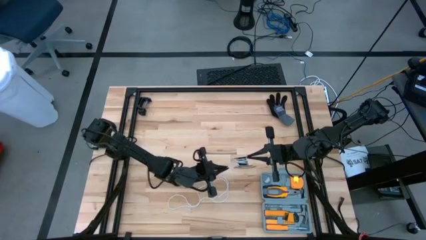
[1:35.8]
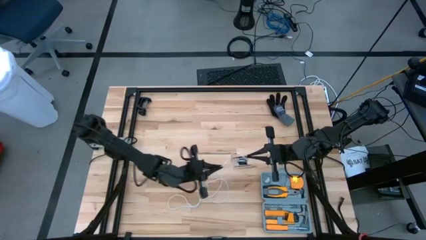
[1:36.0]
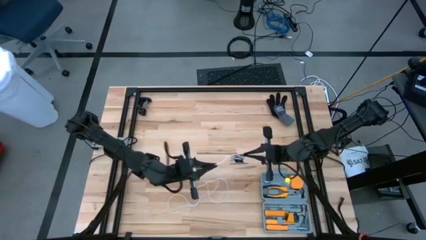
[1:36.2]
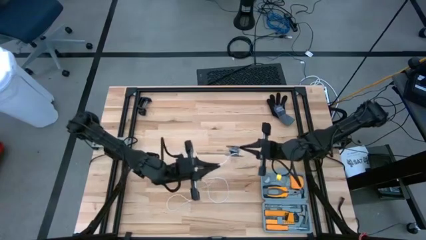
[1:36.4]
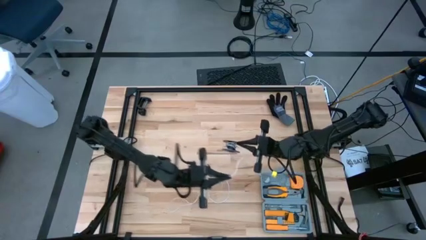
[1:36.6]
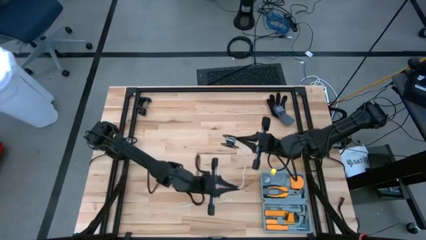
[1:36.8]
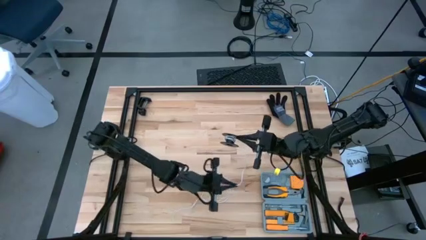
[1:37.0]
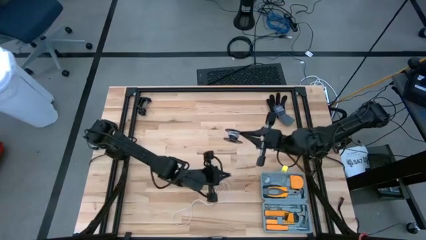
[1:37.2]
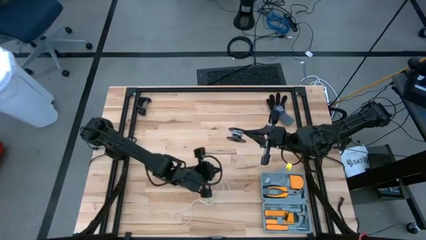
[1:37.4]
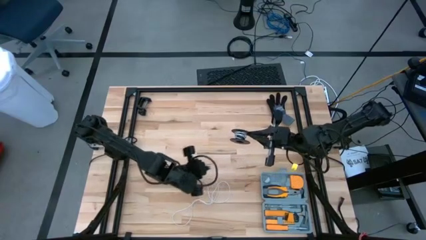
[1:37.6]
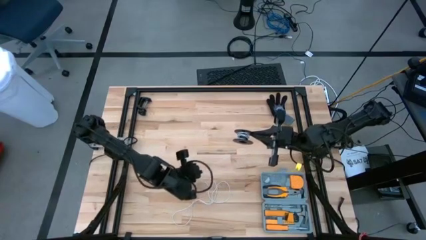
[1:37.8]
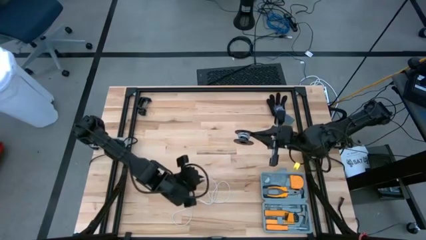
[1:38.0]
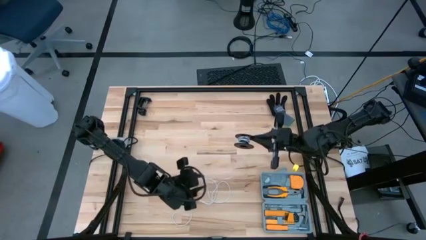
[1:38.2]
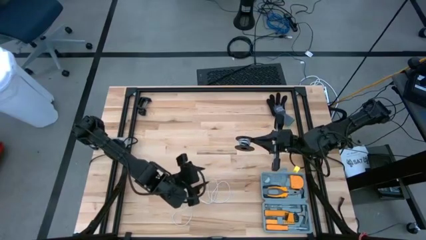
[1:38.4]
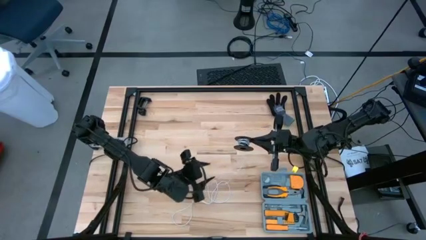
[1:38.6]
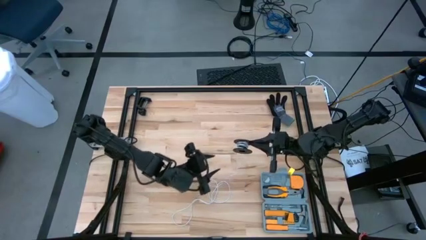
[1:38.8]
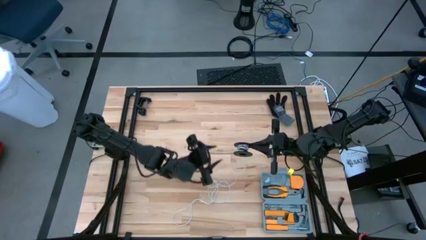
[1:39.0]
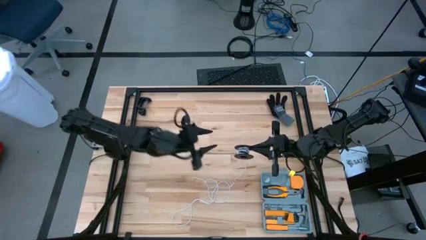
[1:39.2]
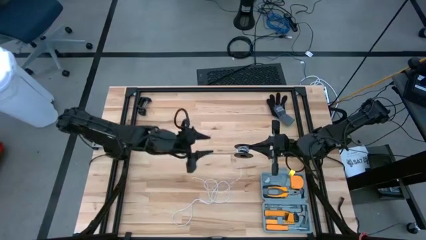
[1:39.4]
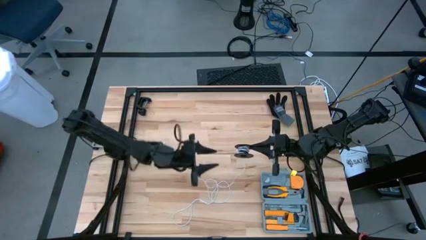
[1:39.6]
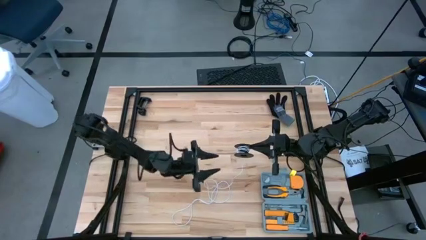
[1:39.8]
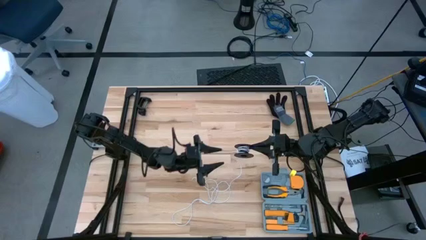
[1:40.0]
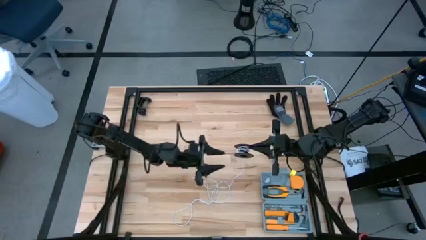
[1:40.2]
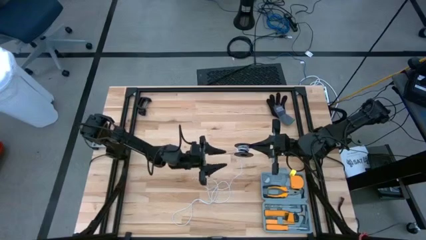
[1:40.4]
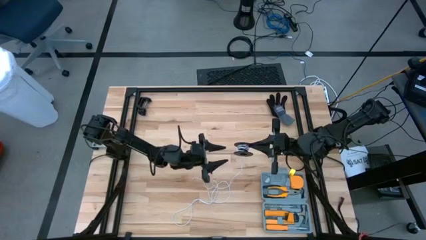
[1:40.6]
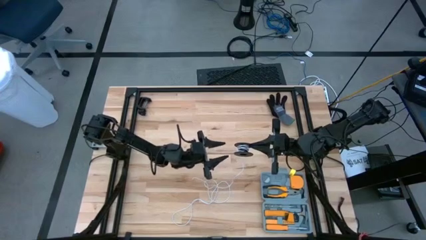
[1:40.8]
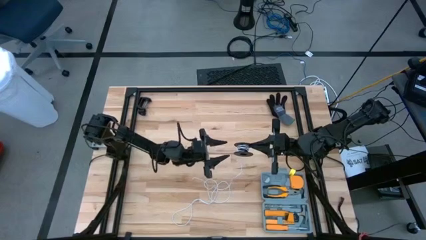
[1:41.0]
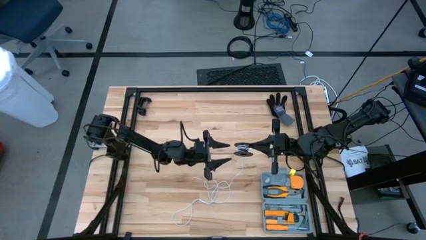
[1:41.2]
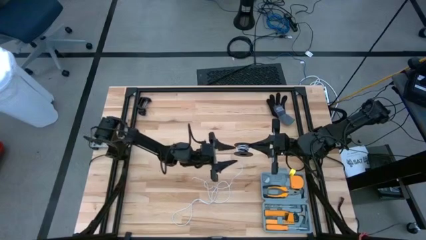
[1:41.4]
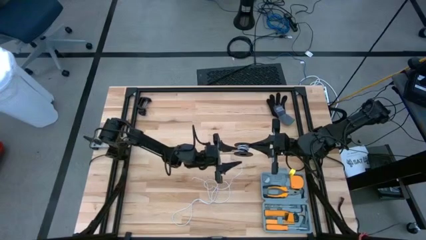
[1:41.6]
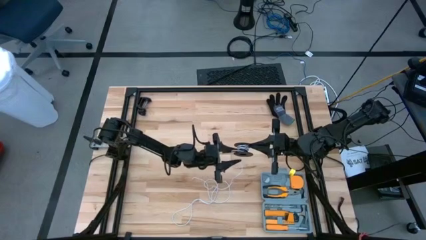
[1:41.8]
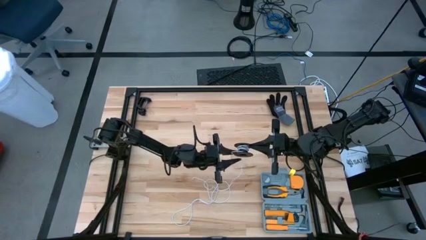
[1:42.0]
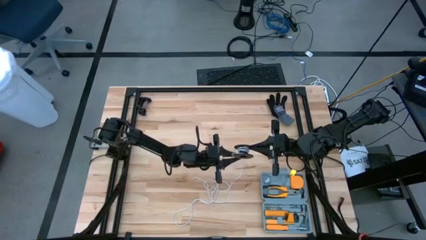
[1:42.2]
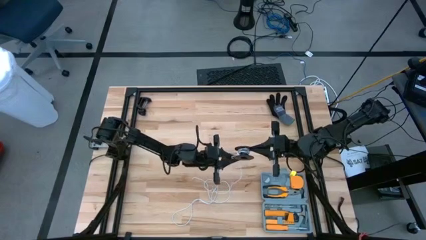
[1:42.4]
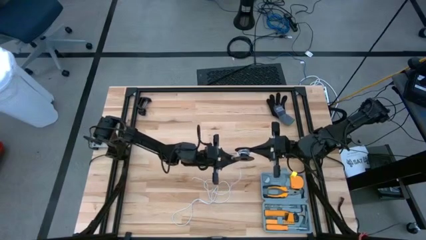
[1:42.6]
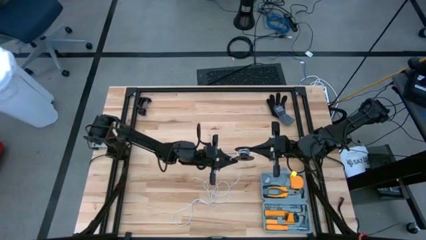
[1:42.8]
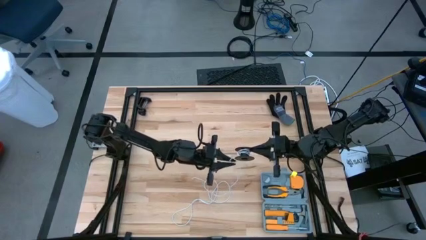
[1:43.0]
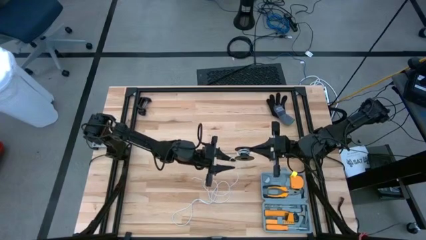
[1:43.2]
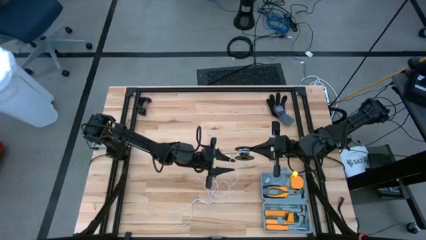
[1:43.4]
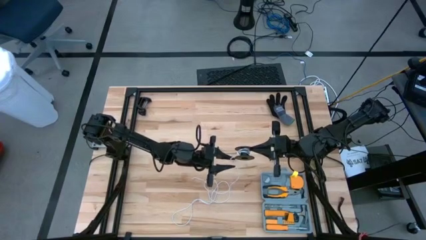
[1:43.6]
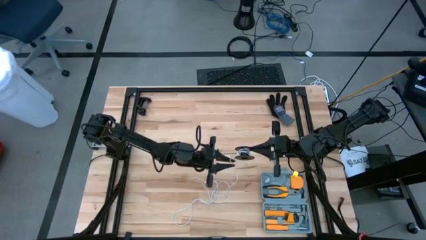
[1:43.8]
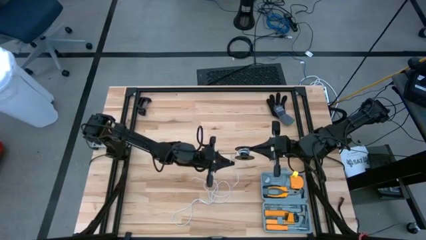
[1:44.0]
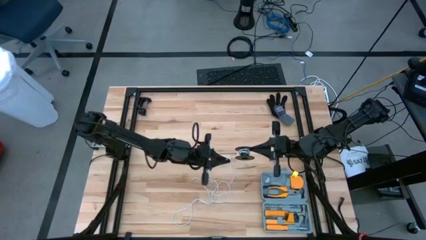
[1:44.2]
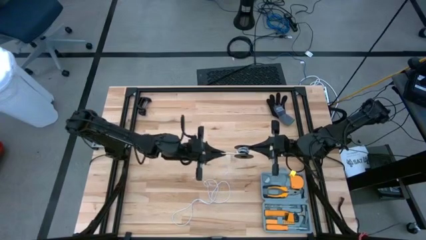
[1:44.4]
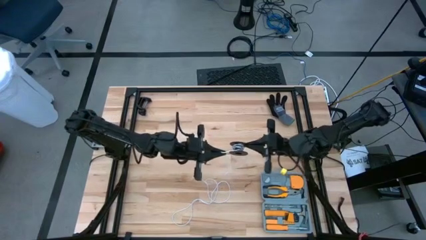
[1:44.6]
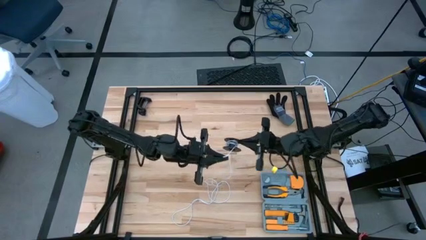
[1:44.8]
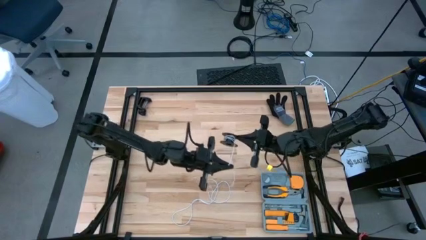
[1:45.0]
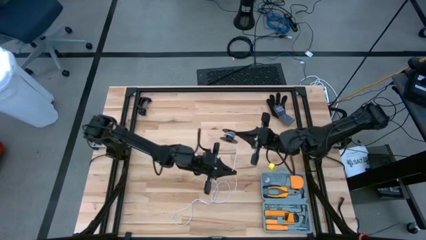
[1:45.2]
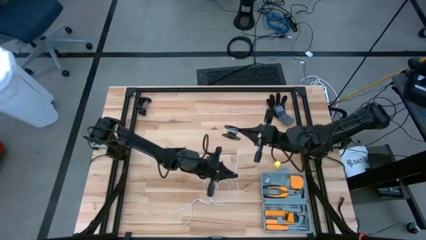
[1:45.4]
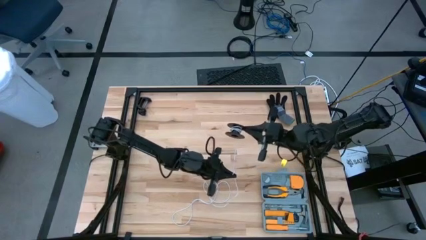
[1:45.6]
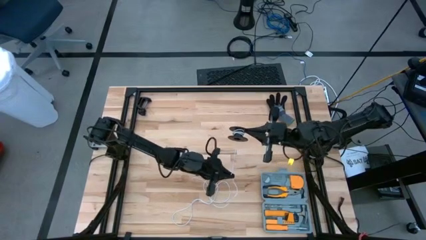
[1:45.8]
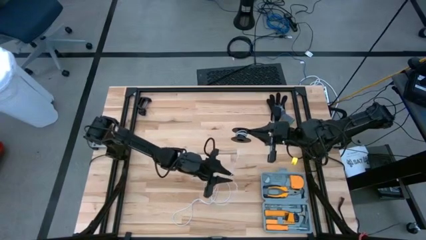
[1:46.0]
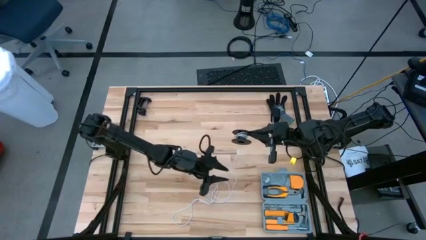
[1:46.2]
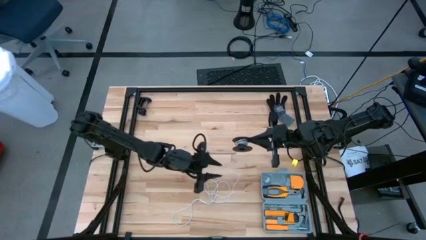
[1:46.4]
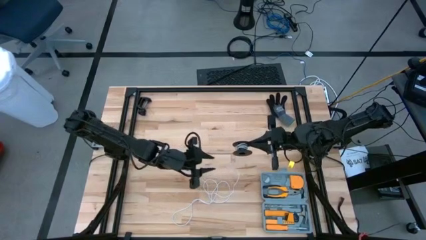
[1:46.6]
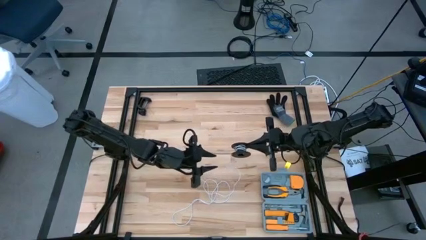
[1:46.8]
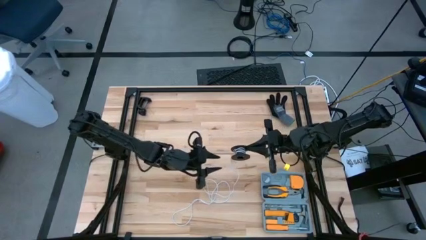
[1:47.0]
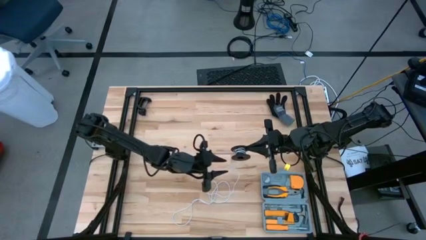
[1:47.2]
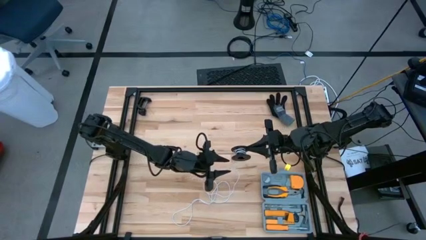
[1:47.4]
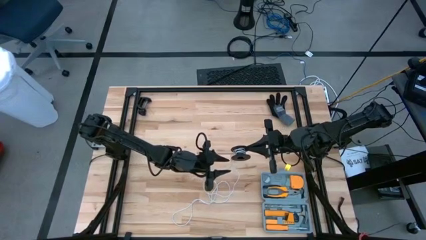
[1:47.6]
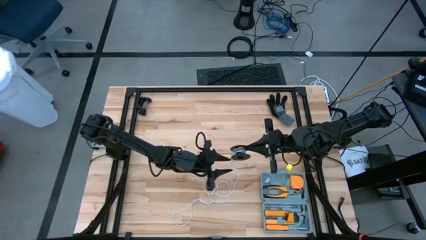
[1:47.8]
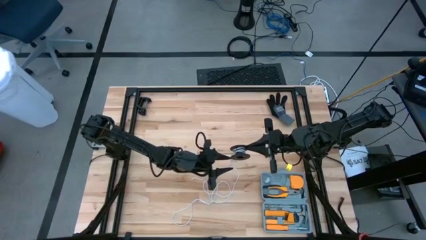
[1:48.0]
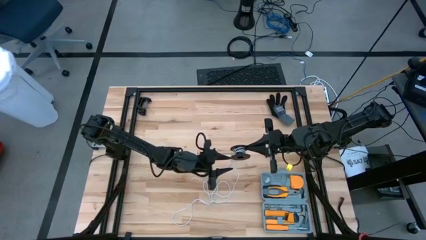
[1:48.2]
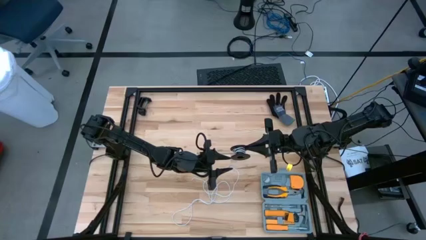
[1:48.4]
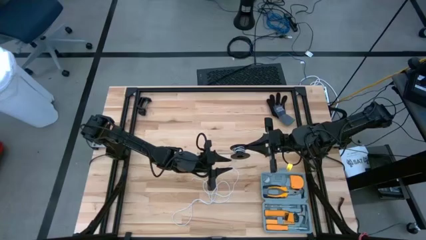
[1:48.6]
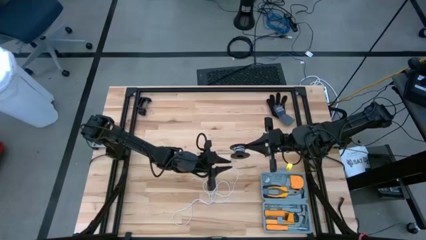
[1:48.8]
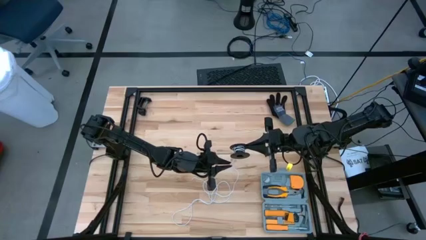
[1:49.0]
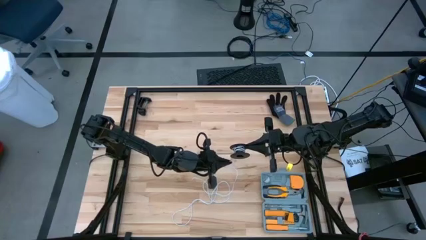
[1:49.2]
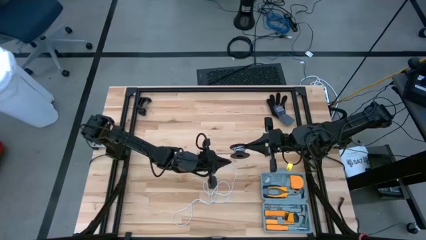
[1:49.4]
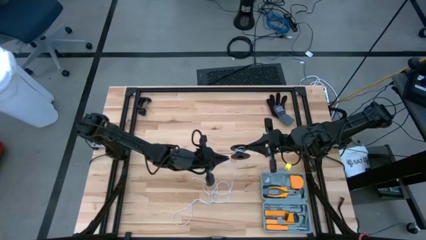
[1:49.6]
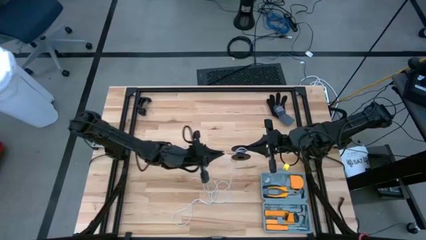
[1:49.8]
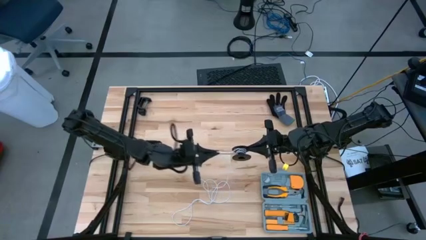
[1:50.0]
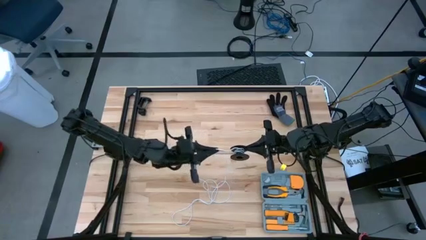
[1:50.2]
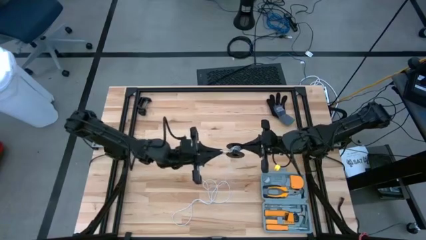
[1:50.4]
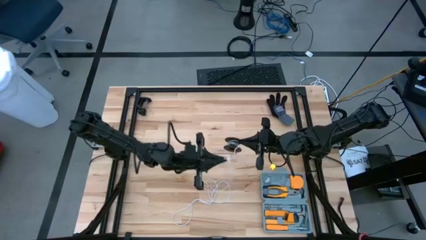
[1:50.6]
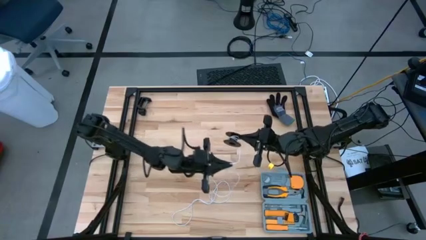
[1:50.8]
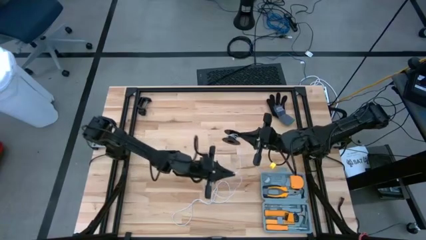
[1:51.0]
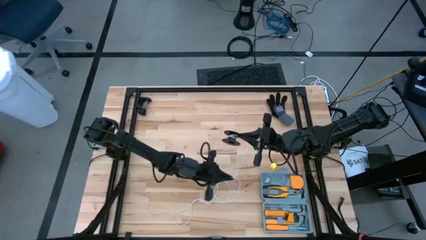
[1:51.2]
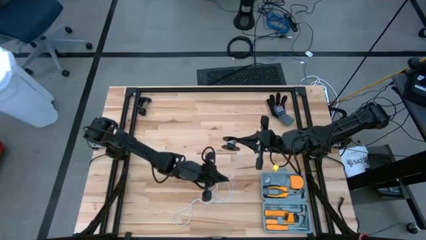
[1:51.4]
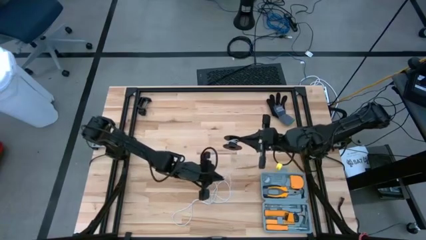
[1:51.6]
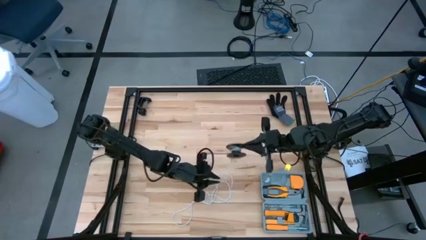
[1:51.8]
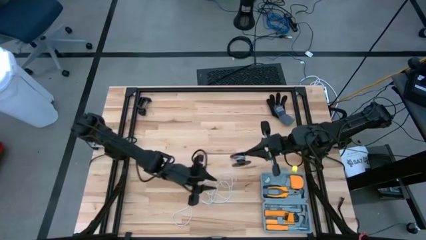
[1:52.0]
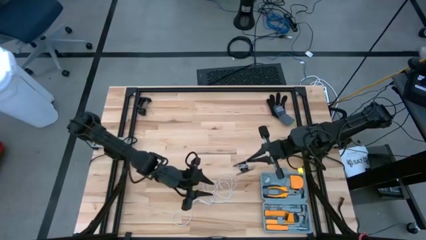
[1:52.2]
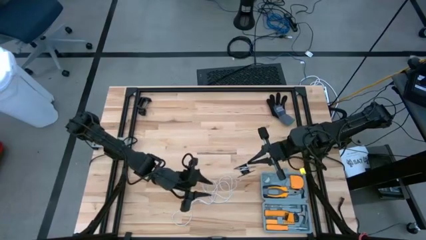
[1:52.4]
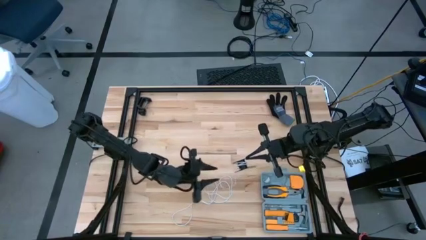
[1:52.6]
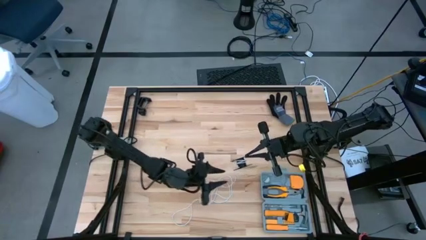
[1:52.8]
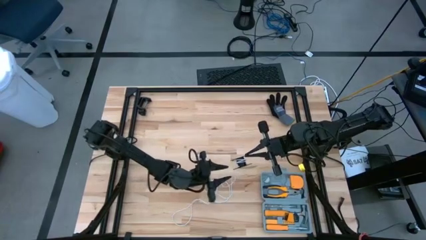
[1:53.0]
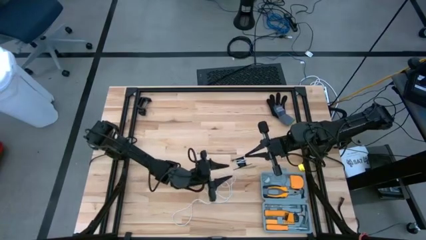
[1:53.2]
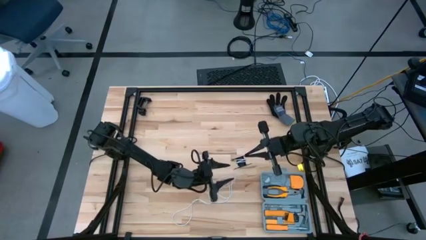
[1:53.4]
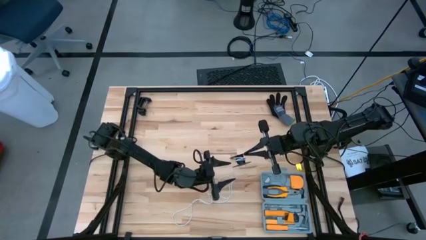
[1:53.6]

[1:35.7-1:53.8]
Task: Coil cords
Uncoil the white cable wire from the spool
